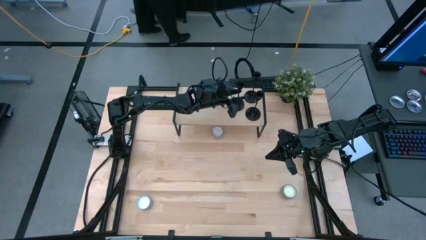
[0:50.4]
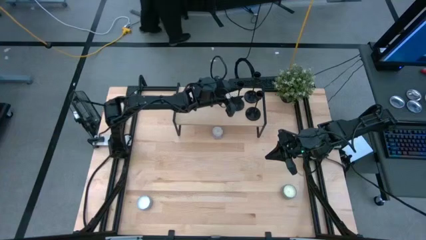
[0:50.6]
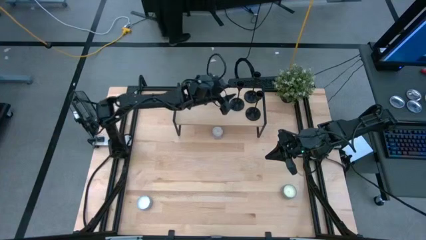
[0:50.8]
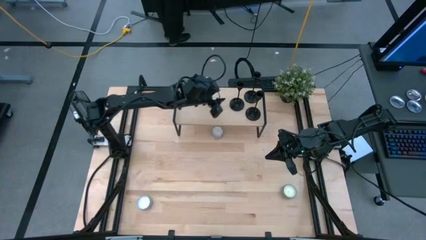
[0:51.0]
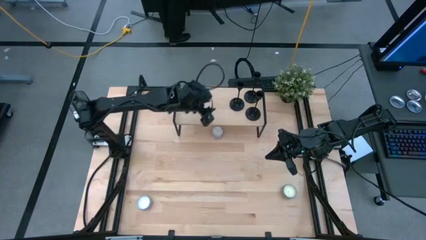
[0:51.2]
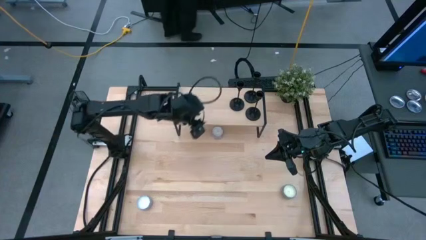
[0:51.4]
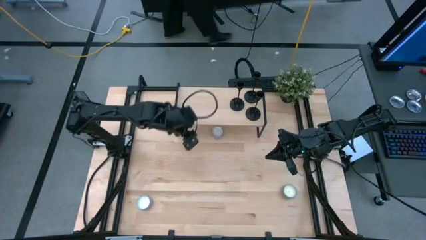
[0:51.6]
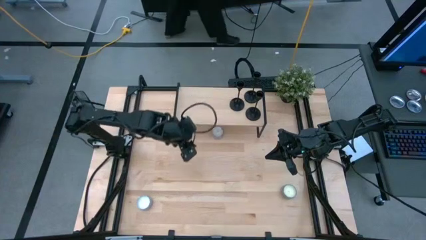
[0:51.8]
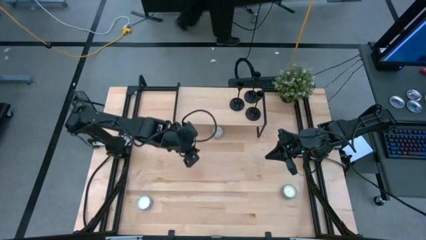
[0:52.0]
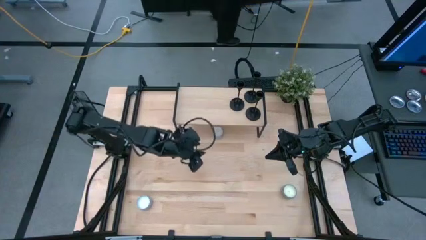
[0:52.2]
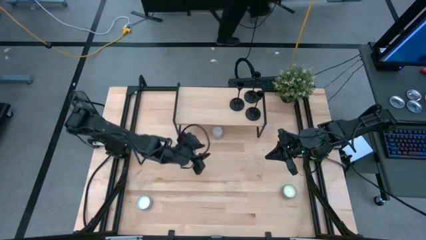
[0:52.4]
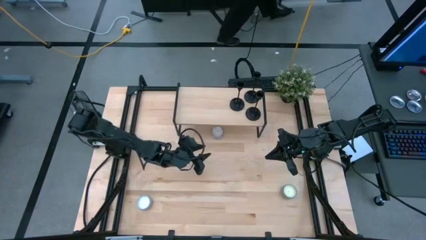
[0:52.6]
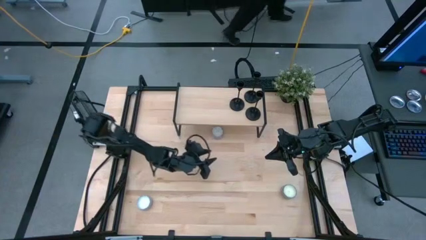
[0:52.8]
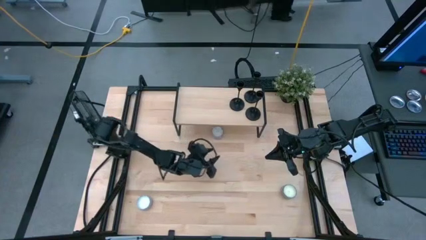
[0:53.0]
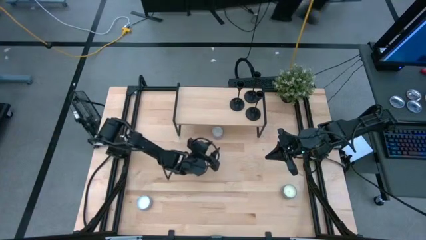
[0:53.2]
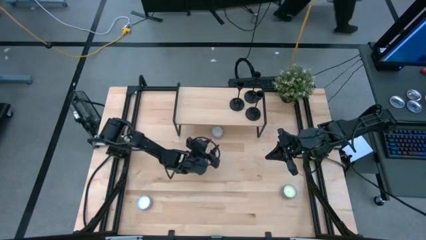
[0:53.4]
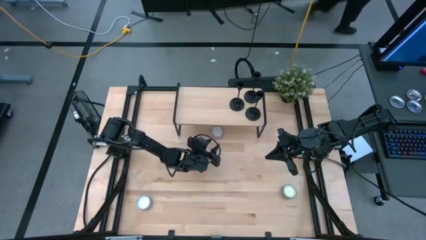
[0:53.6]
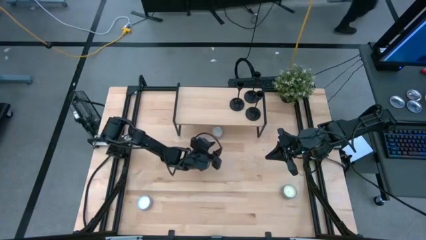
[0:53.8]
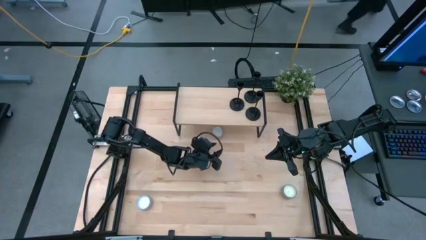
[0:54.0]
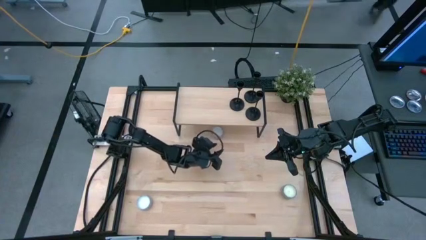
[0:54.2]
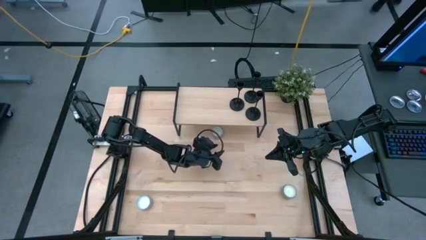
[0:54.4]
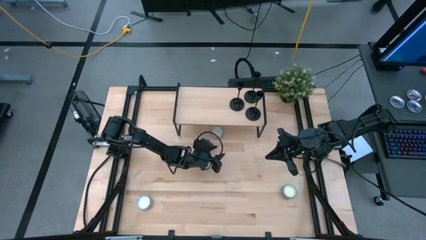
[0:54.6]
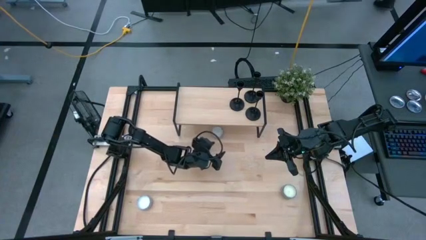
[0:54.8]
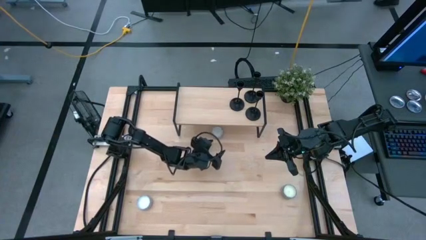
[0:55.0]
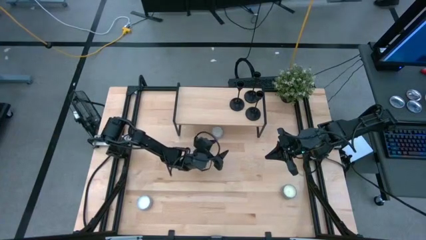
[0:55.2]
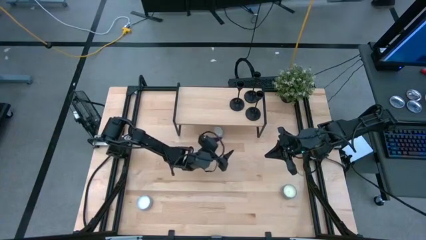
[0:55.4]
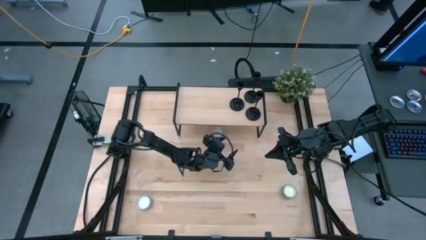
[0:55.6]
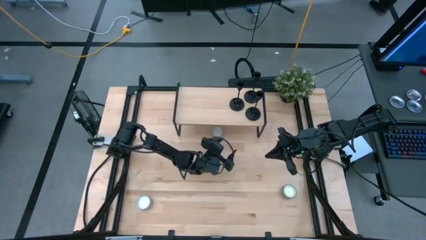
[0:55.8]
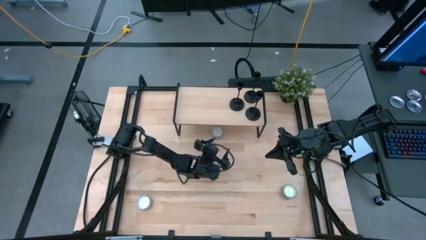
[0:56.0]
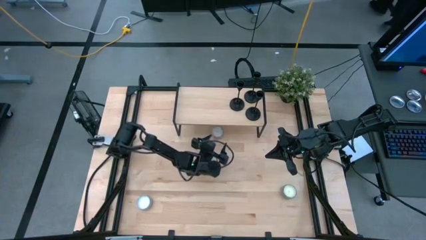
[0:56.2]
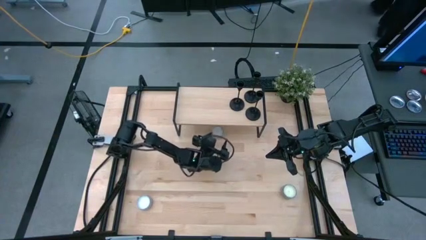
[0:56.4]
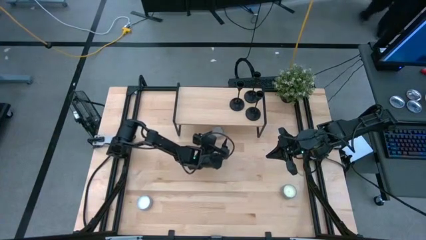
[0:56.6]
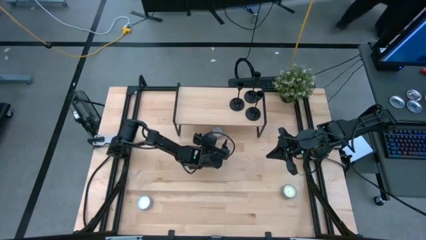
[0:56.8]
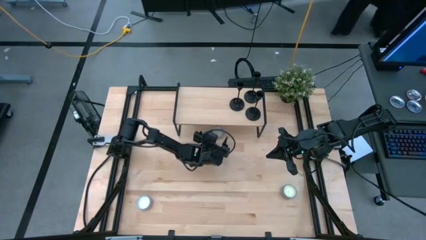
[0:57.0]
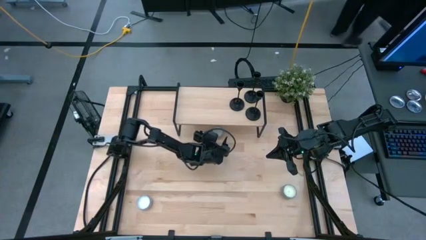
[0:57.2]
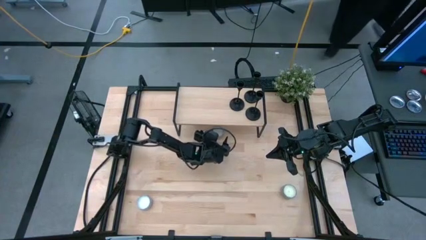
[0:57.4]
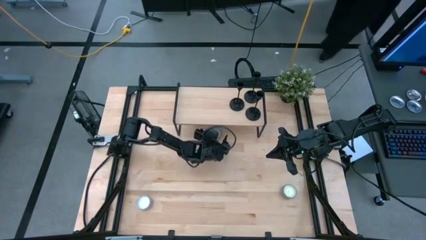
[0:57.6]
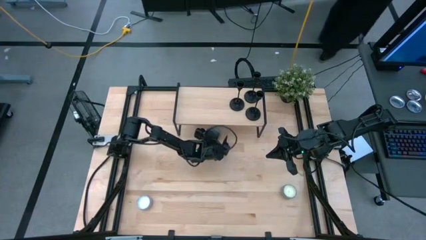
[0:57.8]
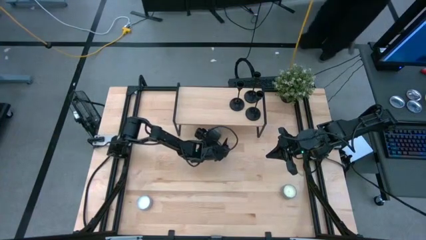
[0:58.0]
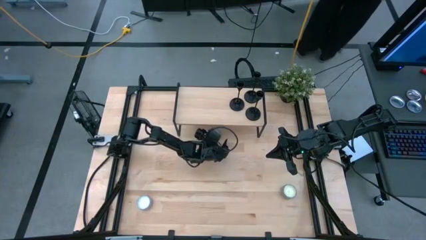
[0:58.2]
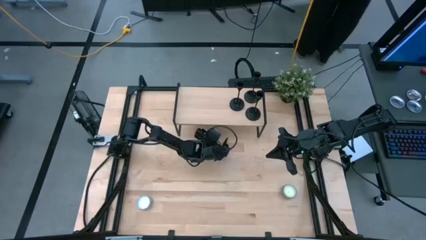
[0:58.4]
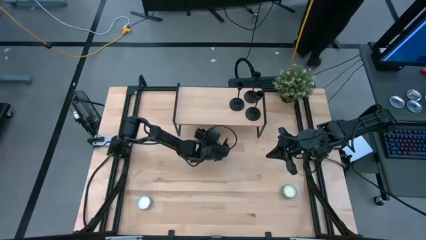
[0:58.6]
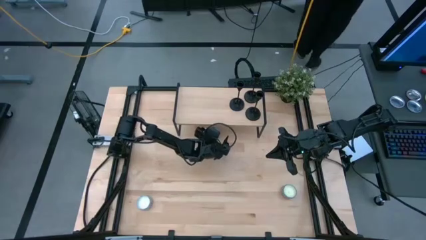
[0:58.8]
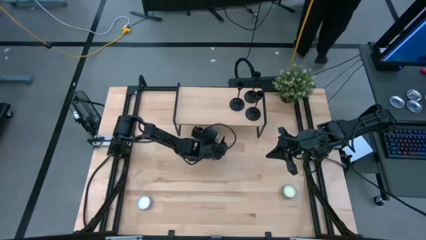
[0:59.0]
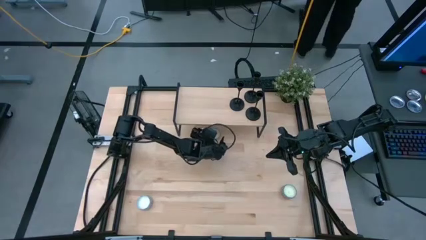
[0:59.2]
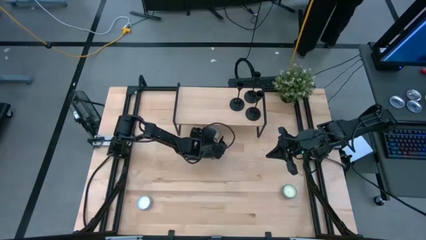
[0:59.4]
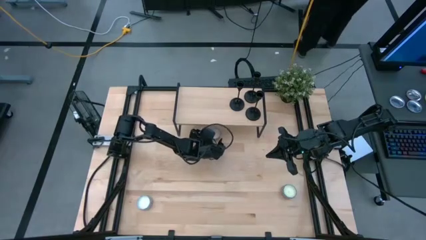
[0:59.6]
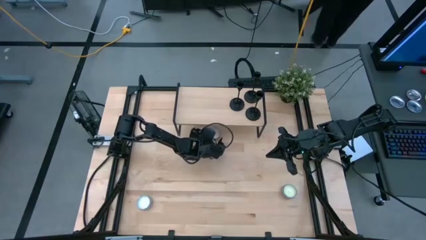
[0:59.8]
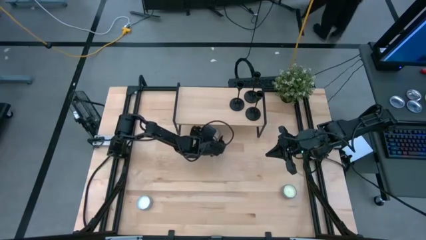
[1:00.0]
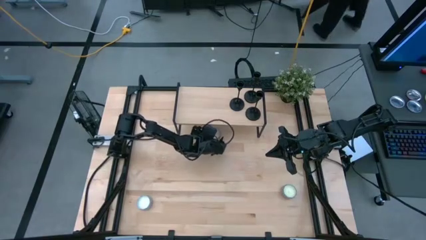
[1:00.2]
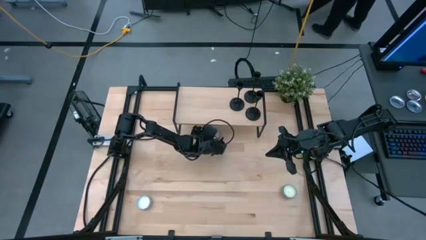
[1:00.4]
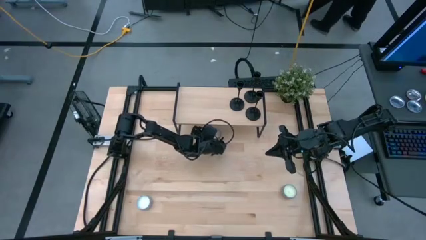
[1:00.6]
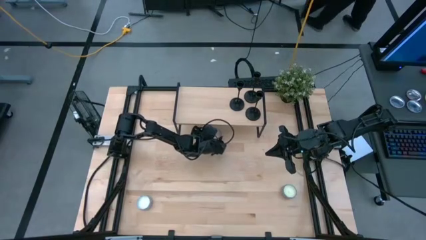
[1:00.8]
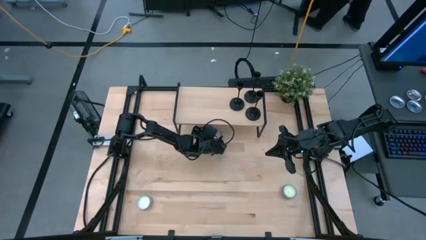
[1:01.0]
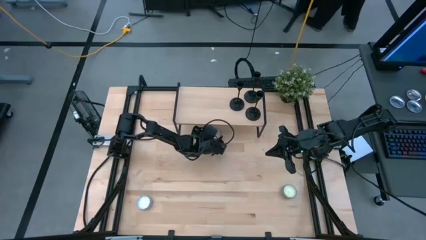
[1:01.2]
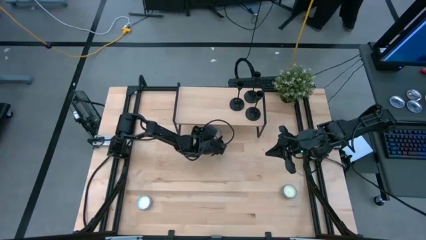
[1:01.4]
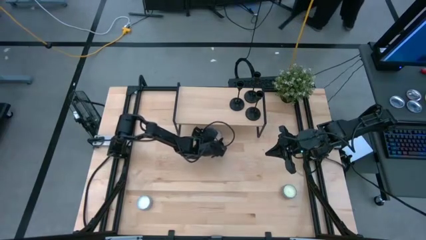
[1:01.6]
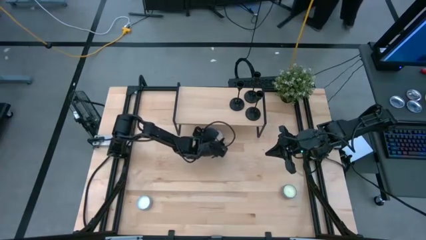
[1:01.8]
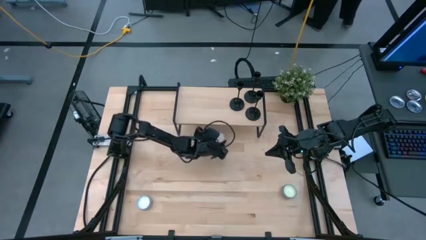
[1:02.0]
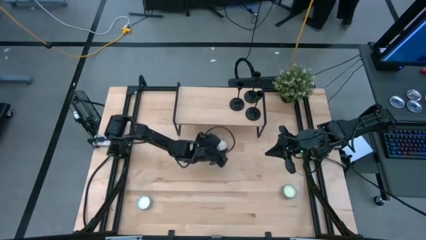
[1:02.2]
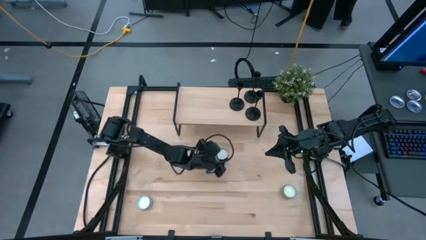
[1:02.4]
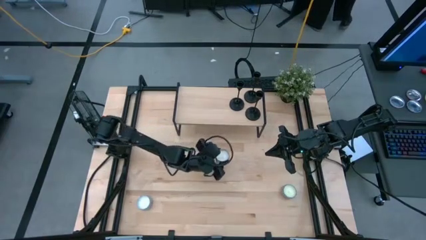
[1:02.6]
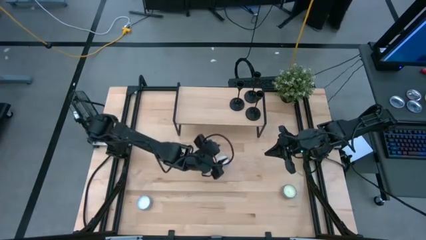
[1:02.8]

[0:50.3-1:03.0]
Task: Pick & Place candle stick holders
Put the red scented candle on the shelf

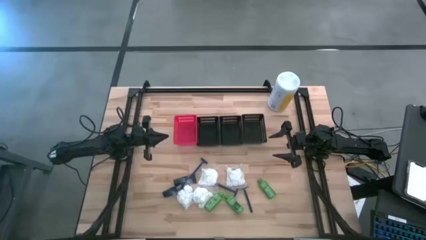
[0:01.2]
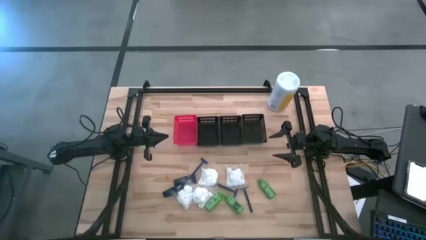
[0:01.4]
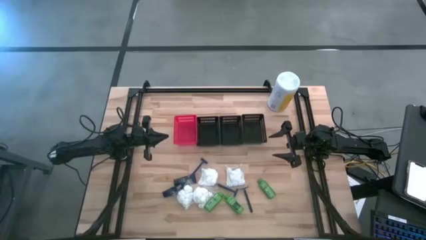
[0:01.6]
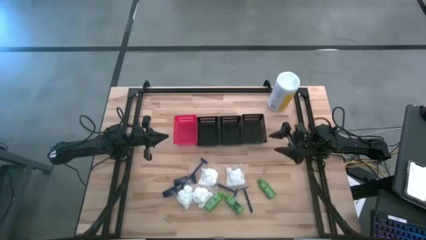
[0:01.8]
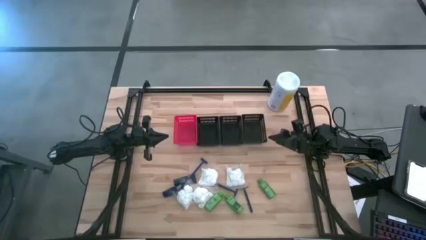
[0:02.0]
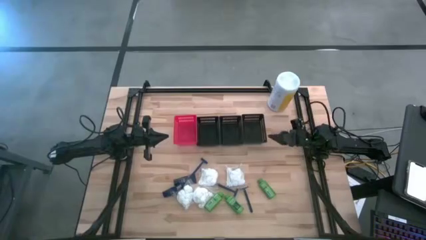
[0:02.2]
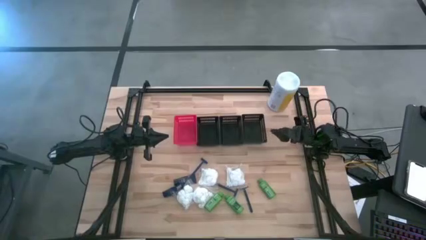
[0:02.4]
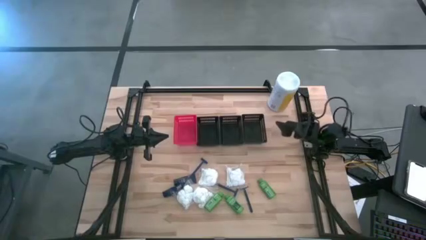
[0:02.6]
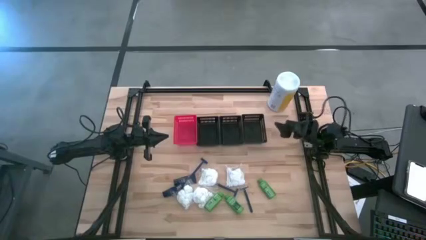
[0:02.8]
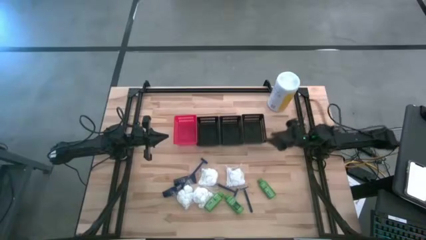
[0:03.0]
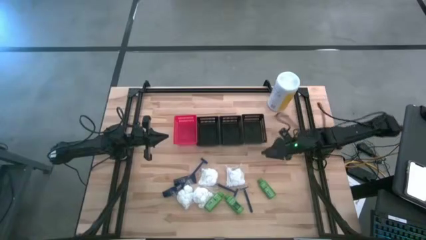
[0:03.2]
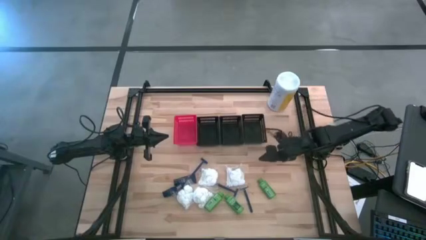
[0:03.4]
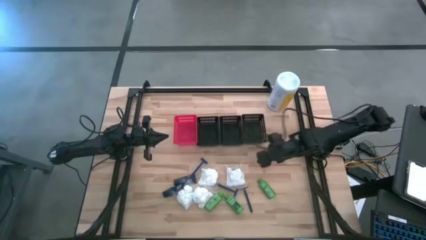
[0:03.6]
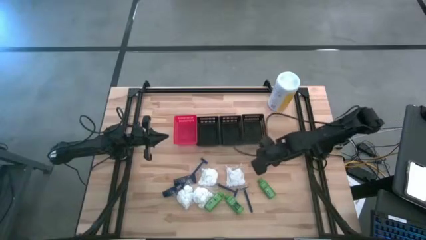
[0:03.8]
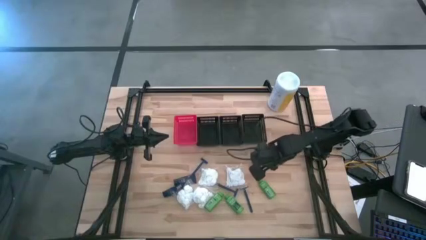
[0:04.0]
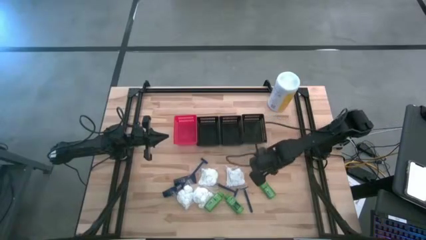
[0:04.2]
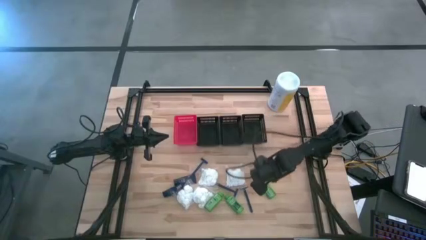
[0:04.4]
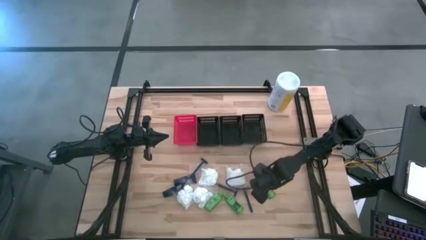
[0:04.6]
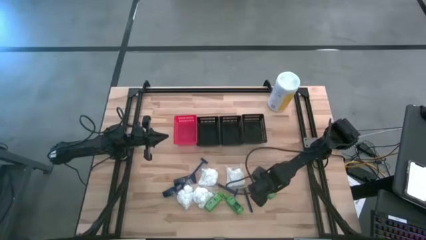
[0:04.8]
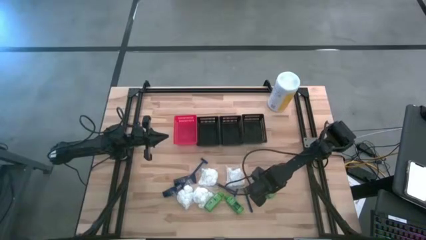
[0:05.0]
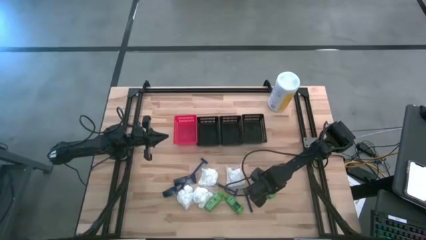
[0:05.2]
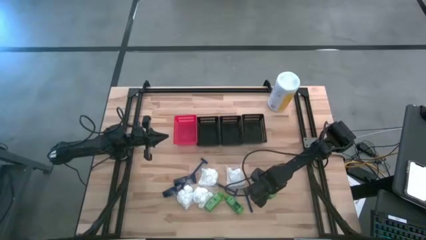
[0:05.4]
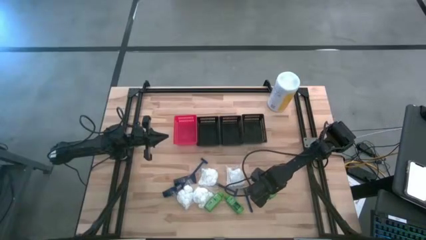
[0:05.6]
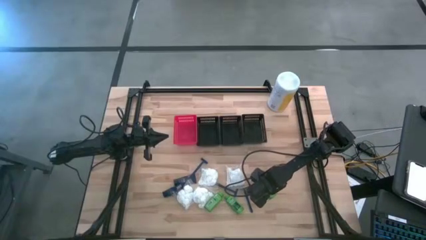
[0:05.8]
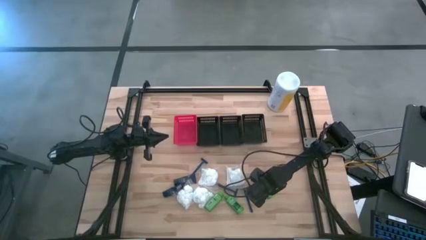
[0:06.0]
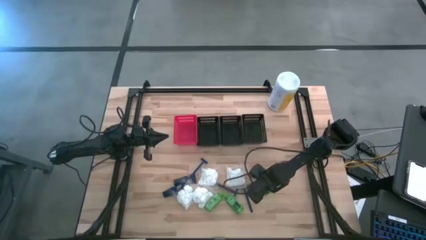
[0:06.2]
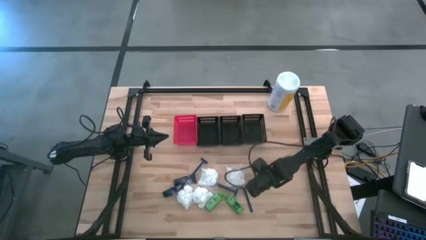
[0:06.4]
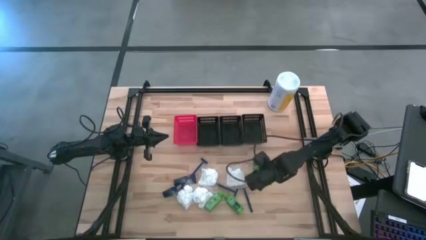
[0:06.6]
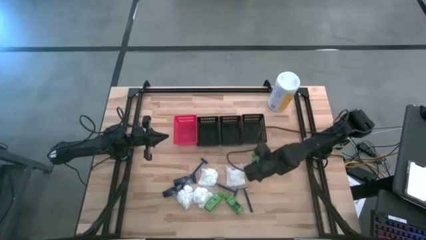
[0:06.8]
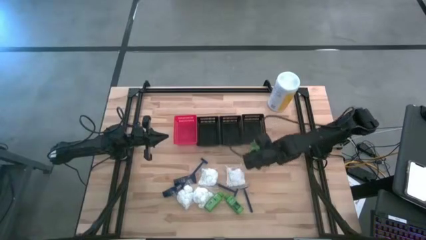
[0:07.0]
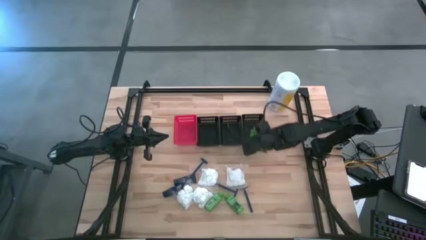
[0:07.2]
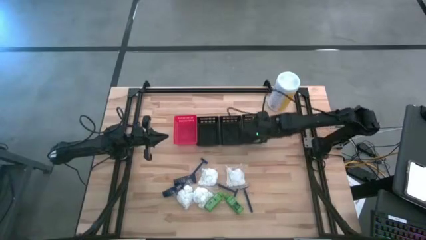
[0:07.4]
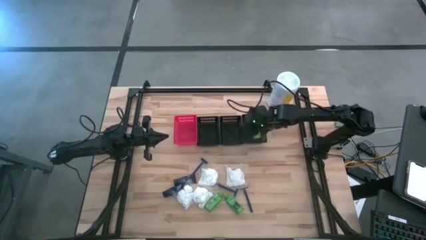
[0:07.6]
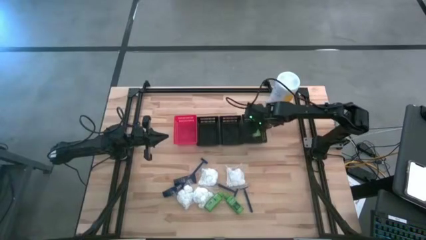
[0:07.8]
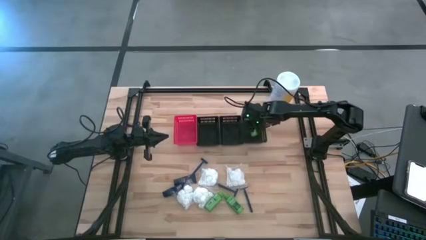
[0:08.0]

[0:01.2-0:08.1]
Task: Pick & Place Travel size toiletries
Put the shampoo into the right black bin
